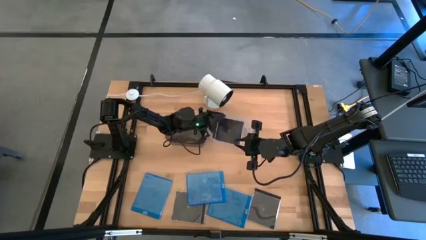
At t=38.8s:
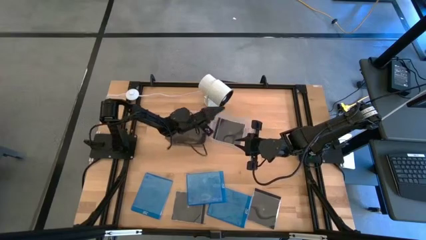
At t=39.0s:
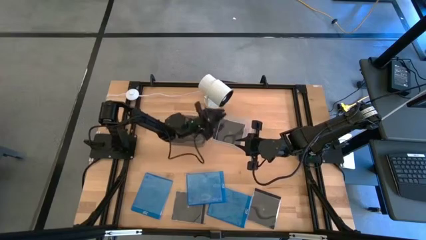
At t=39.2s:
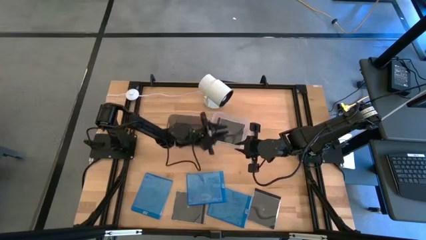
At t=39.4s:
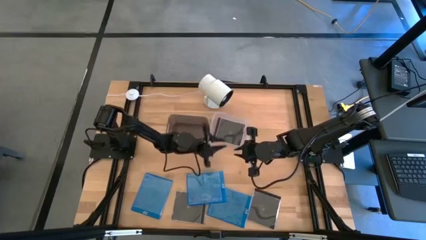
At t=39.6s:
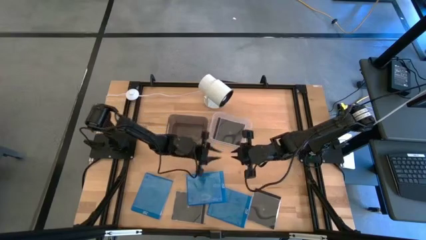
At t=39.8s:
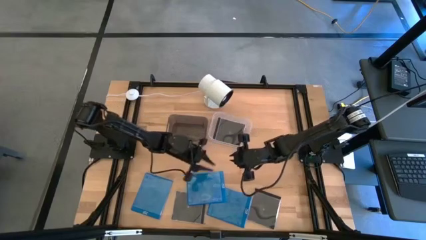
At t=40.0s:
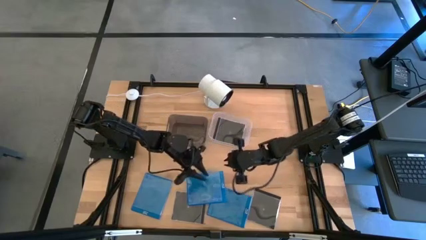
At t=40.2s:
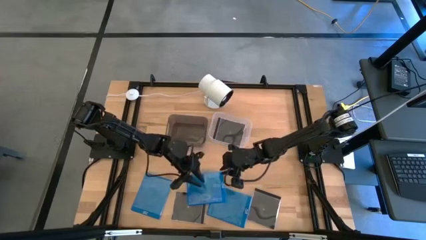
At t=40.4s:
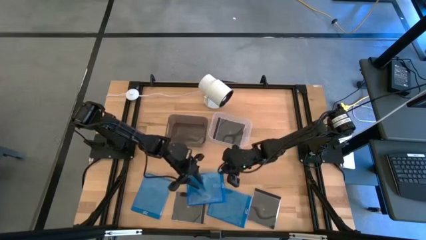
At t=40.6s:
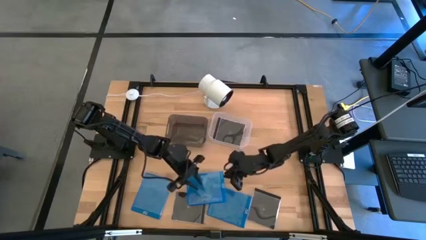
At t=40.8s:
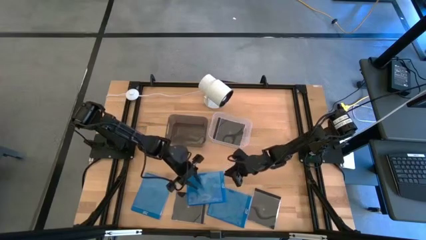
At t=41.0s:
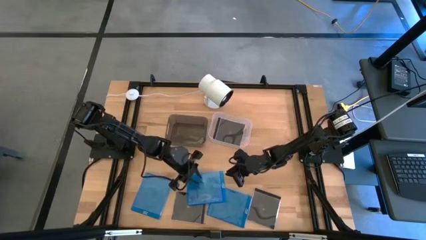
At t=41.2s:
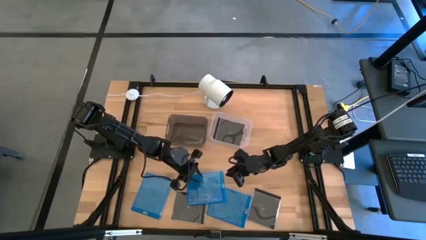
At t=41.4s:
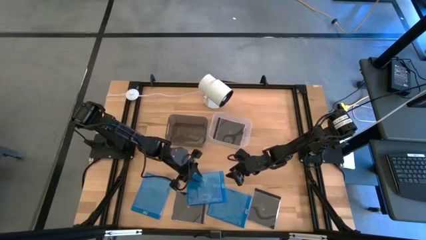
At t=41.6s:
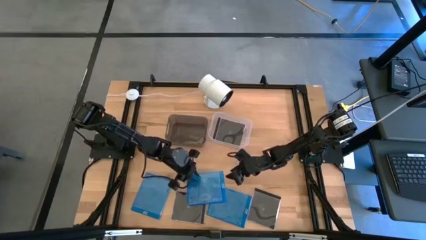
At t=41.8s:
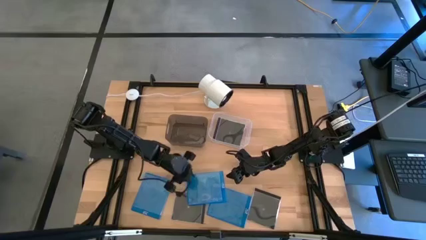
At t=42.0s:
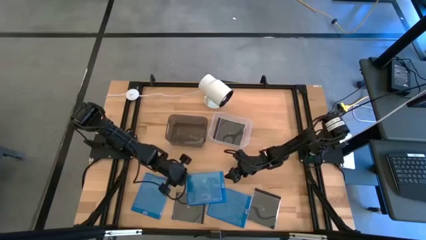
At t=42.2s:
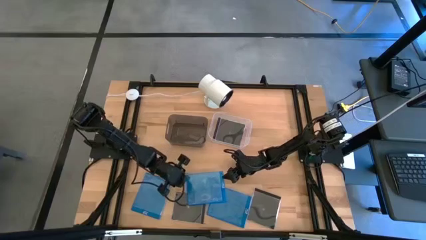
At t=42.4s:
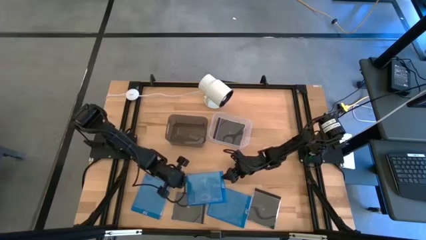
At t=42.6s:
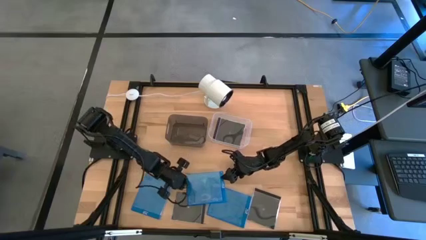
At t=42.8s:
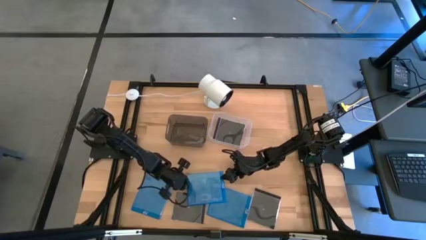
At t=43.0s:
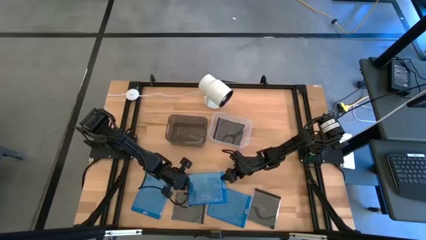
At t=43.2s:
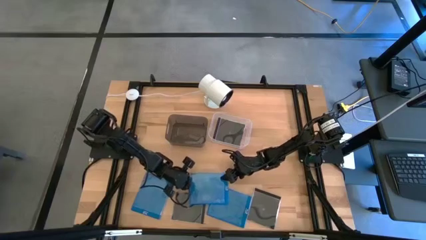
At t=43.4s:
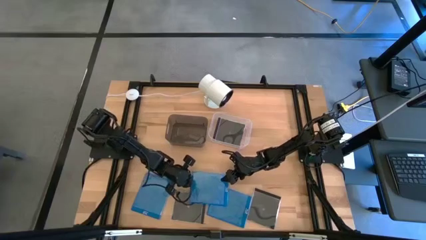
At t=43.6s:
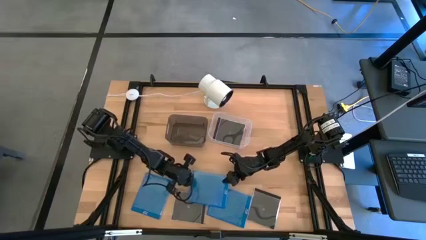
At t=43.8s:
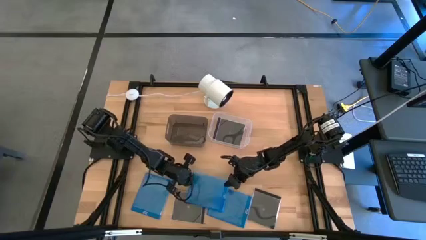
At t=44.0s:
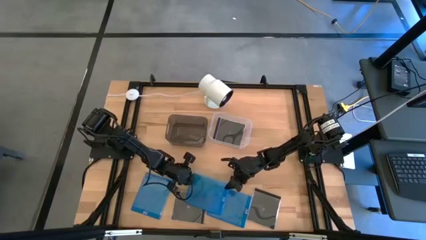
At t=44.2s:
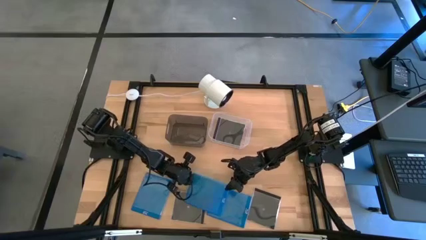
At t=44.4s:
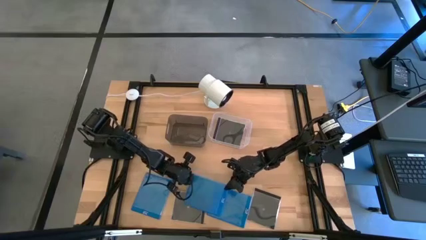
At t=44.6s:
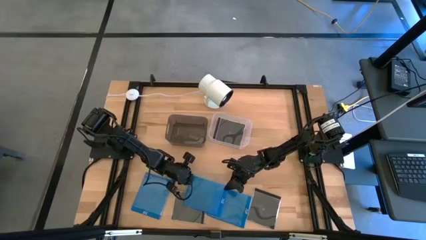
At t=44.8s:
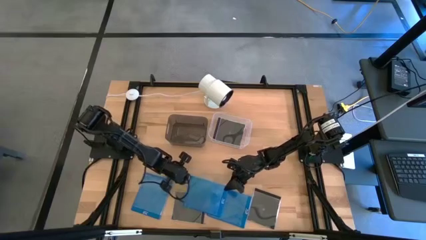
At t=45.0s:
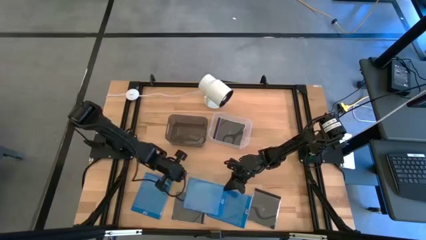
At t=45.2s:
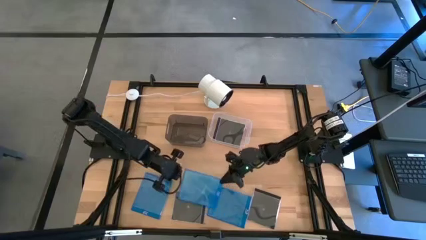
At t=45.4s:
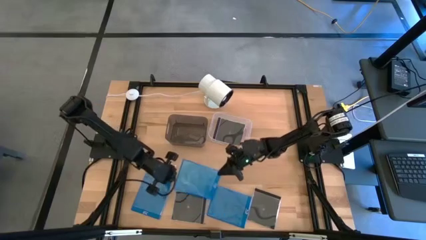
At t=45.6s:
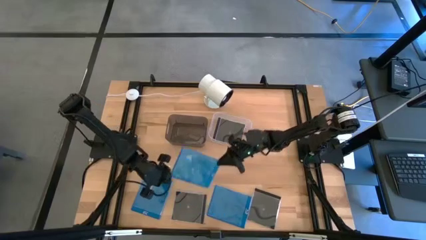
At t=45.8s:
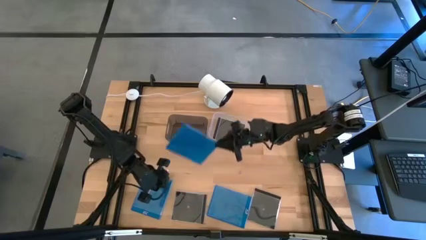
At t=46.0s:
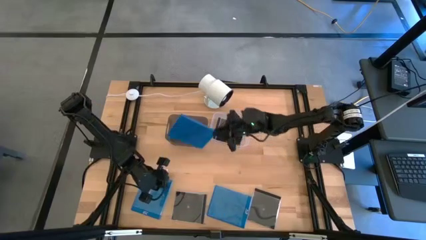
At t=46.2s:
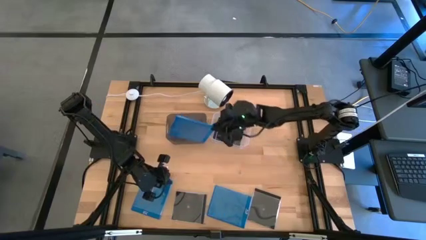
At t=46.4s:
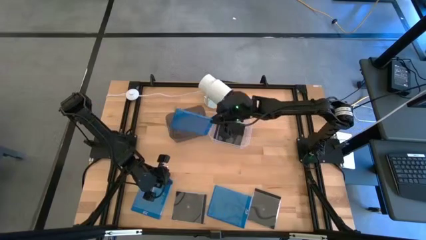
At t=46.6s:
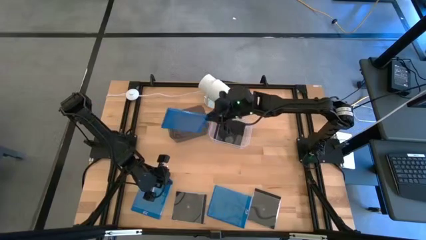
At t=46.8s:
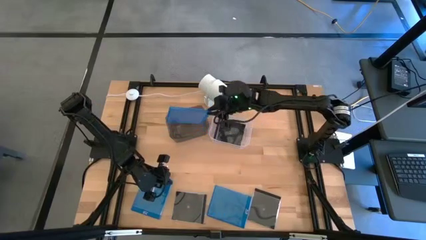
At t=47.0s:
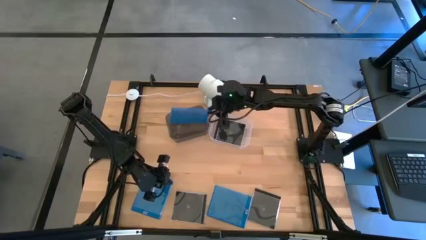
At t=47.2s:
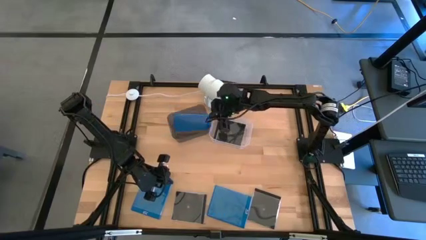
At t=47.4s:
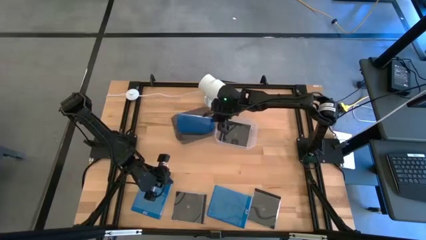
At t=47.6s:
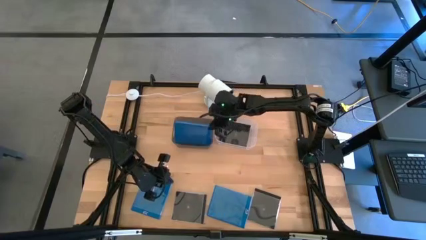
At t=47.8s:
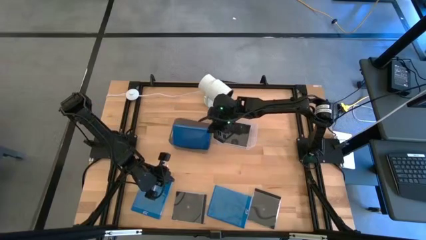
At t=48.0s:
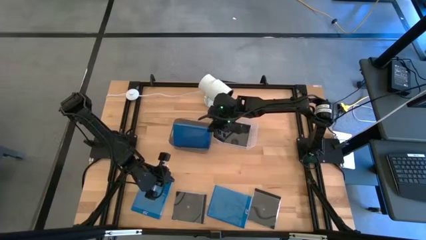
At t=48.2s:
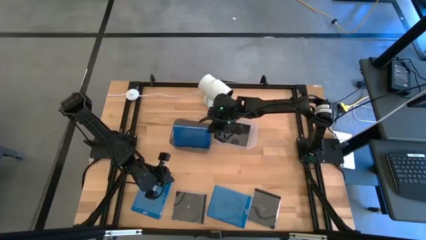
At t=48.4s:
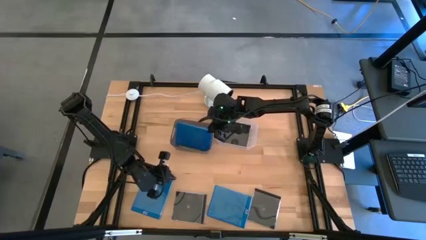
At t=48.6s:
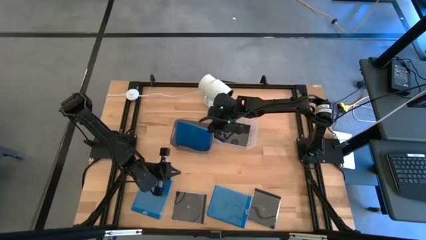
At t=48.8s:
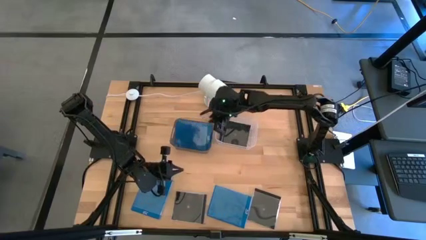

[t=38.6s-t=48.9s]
Task: Pick & place jewel cases by type
Put the middle blue cd case into the black bin
